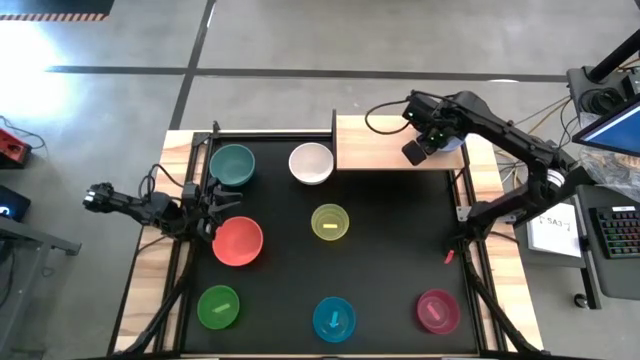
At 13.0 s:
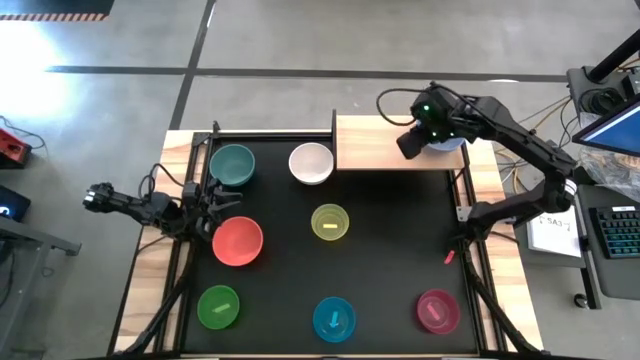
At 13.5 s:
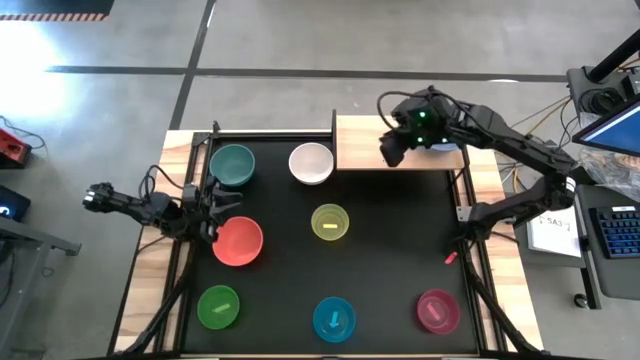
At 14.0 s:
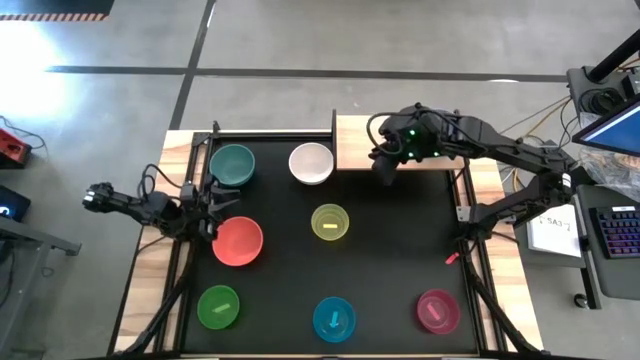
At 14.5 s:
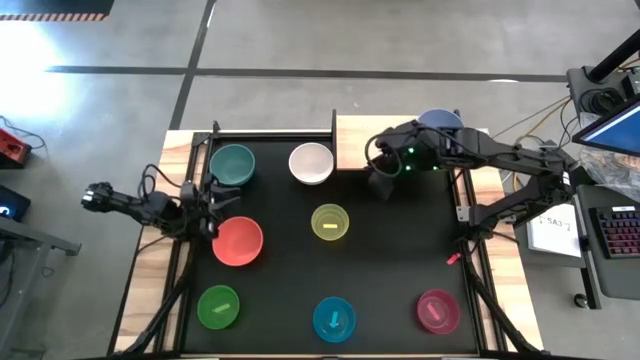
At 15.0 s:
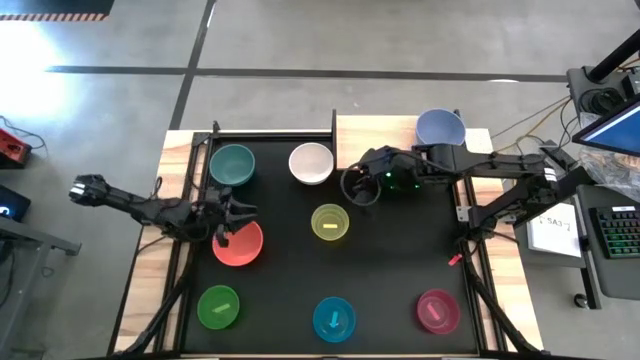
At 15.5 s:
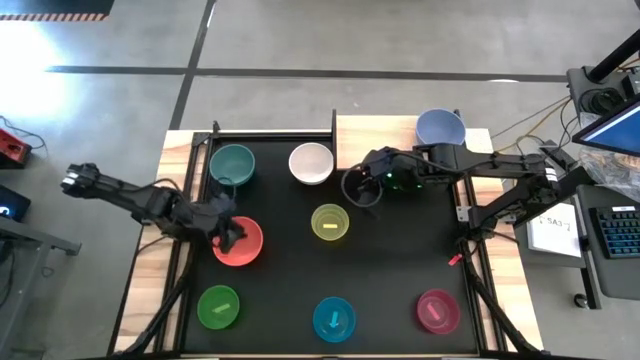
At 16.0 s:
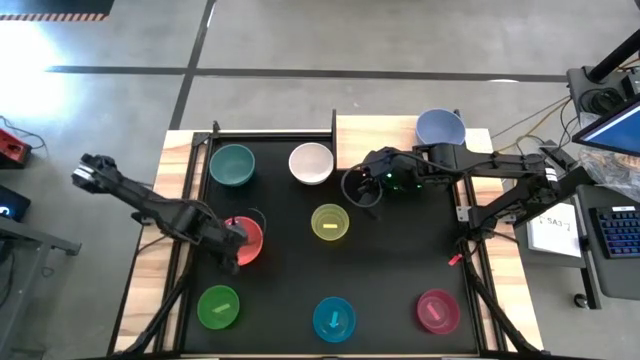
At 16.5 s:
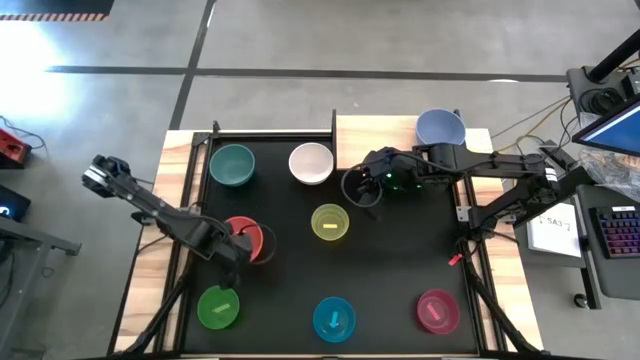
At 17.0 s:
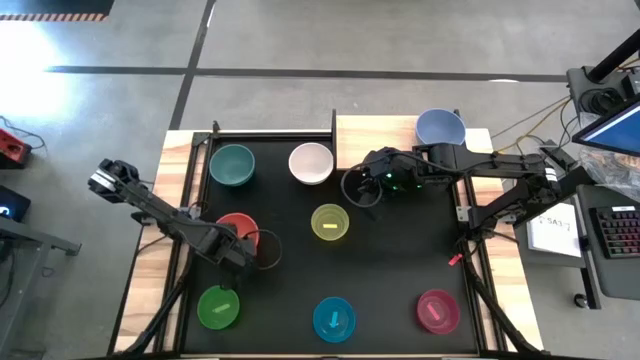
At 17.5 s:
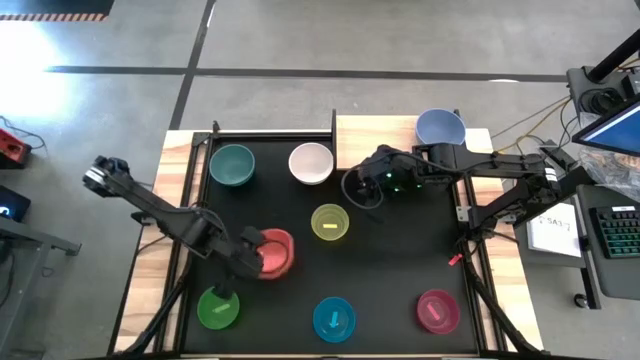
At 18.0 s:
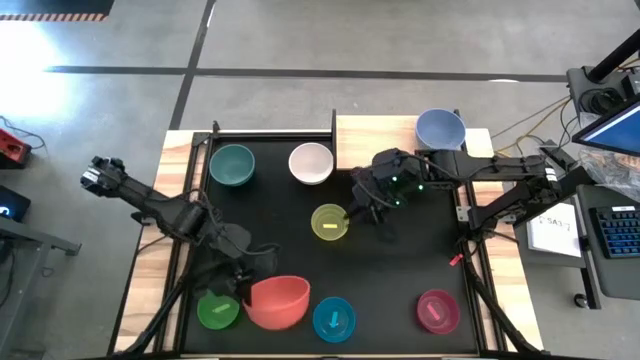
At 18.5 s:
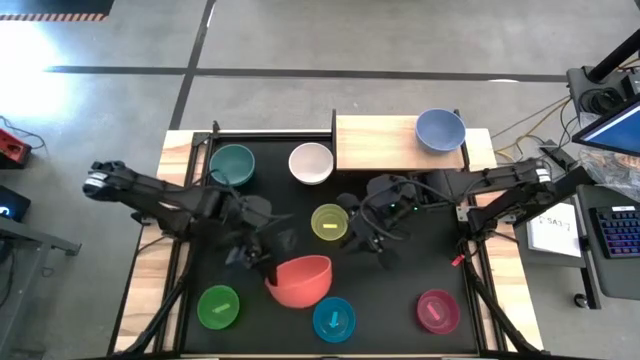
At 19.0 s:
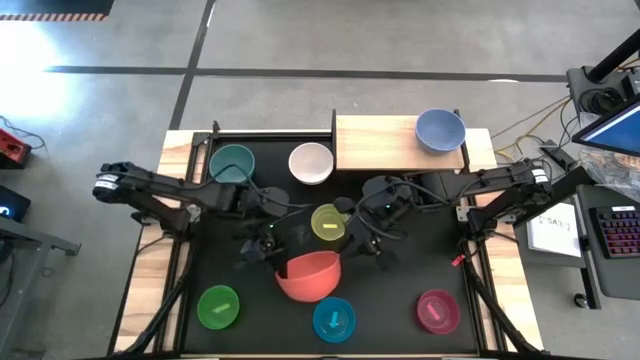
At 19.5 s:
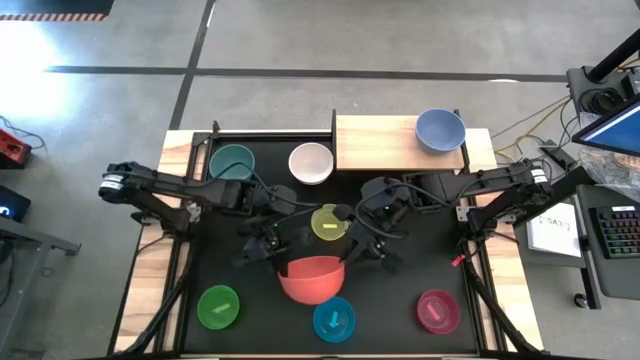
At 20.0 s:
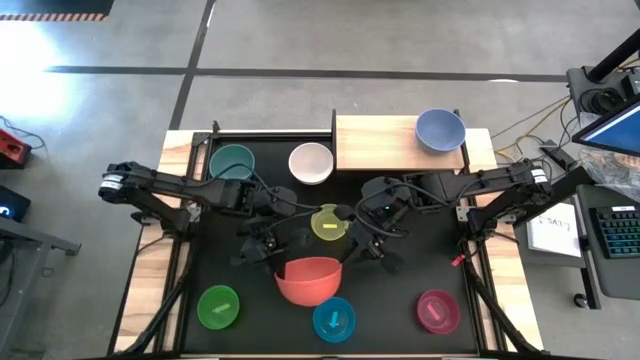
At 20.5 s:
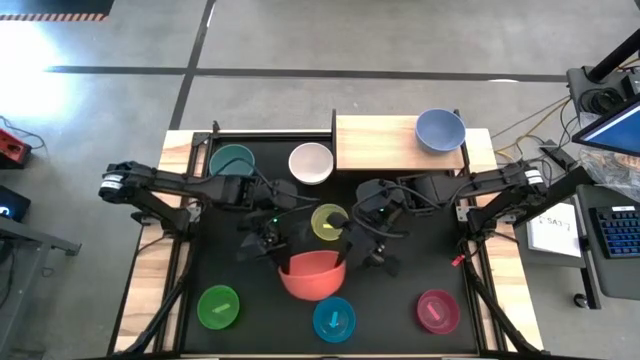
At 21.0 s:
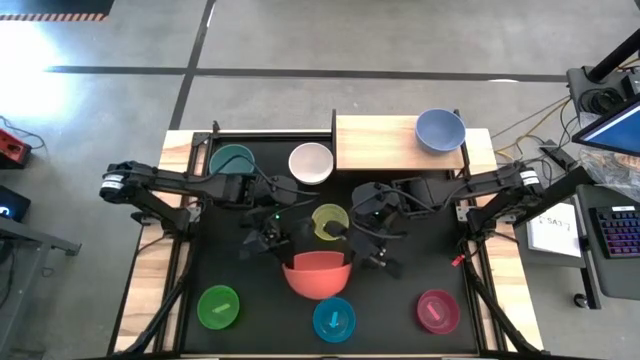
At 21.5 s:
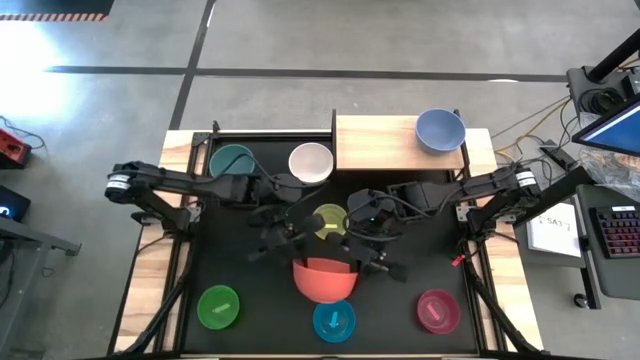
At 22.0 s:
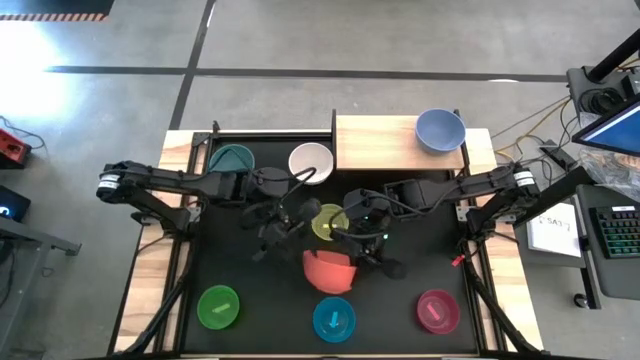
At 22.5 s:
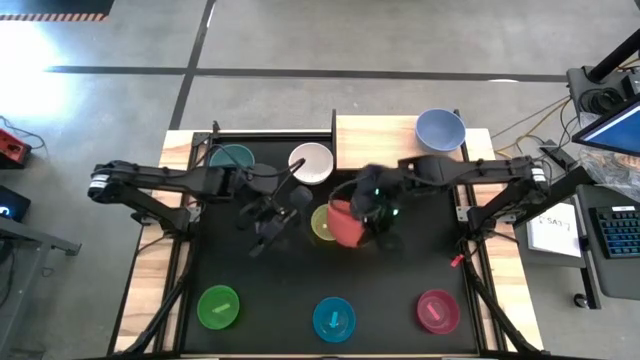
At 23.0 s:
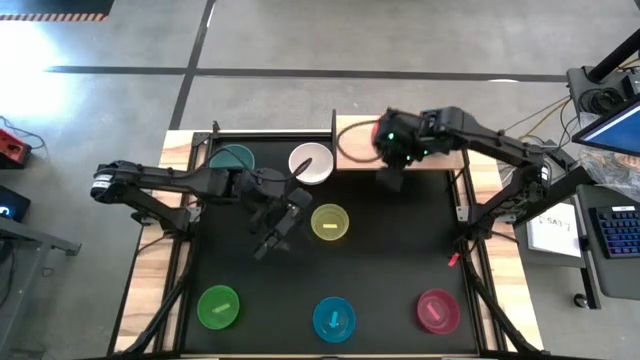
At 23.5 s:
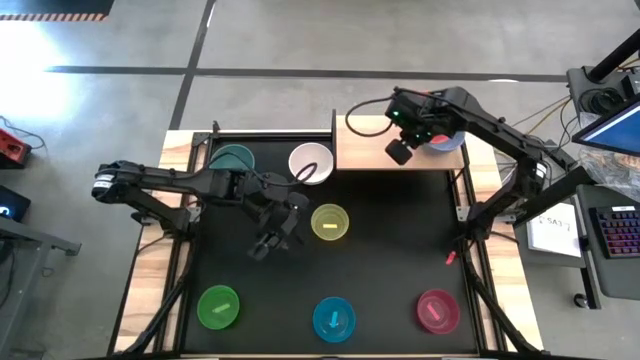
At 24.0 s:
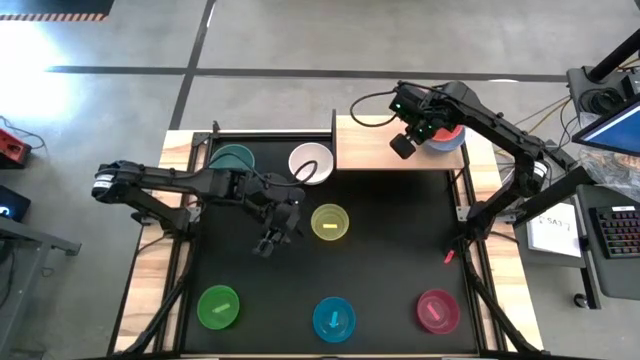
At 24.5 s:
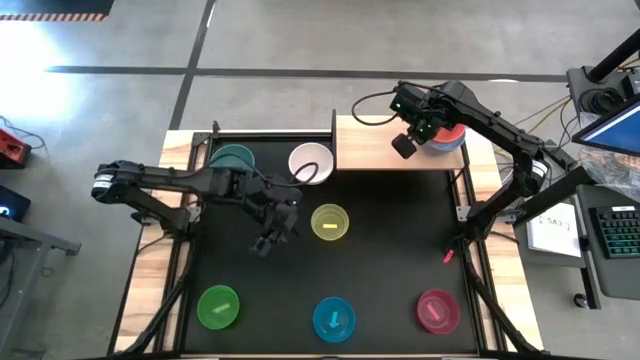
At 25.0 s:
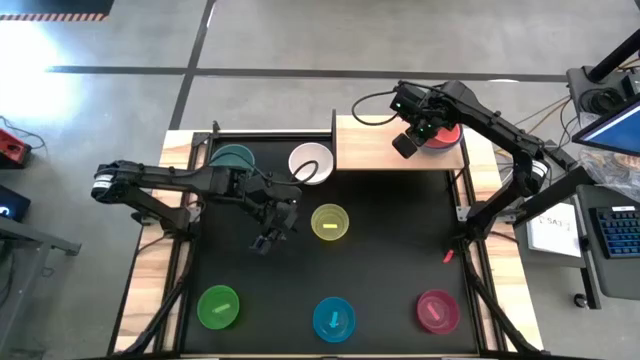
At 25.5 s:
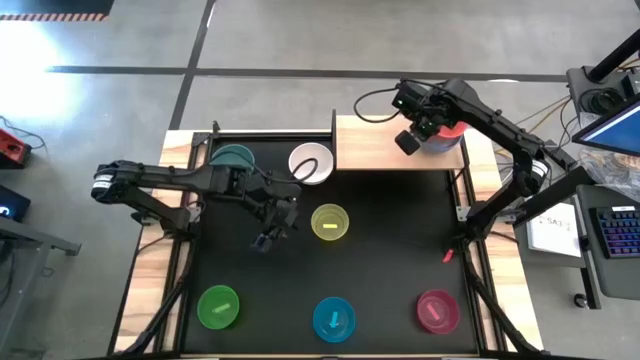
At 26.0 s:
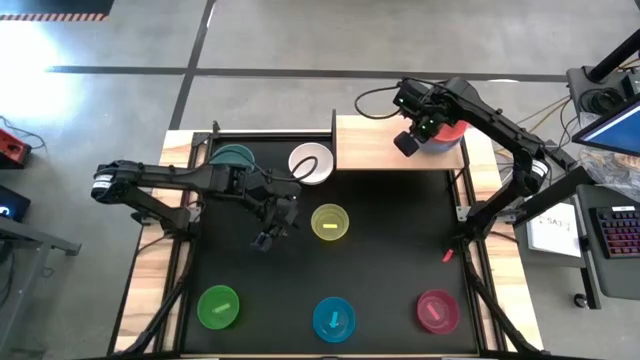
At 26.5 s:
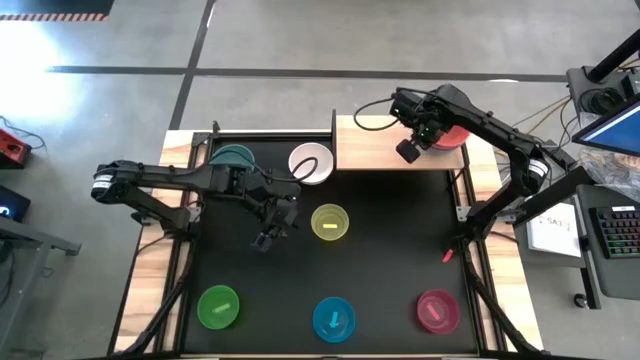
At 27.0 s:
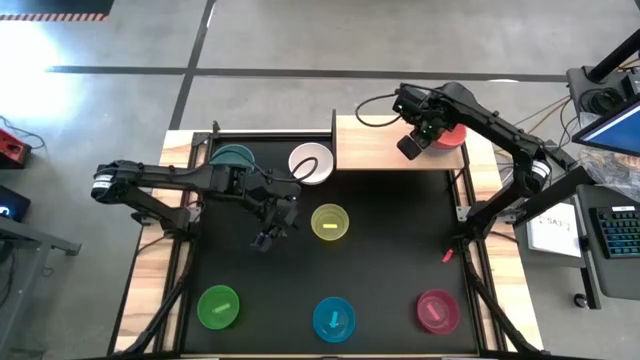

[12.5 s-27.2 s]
Task: Place and stack bowls onto a shelf
Stack the orange bowl on top of the blue bowl on the shelf

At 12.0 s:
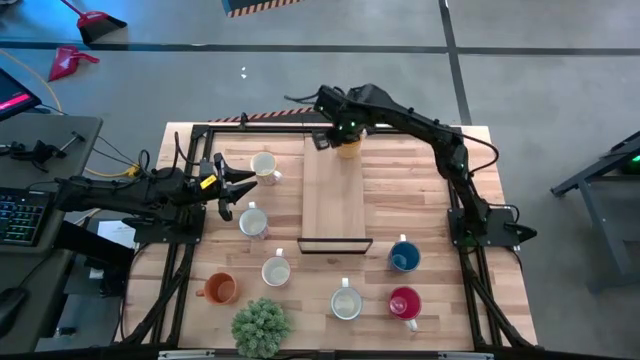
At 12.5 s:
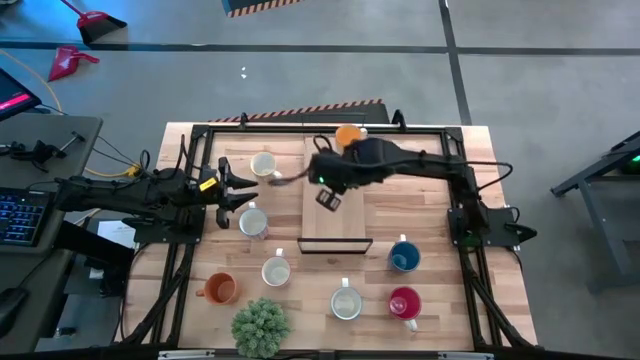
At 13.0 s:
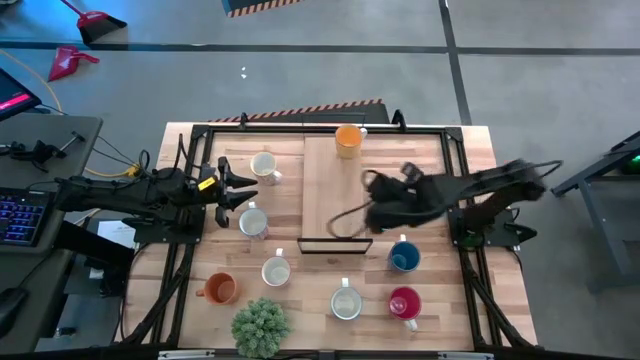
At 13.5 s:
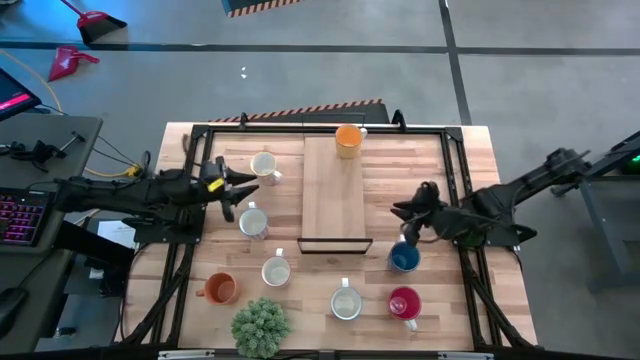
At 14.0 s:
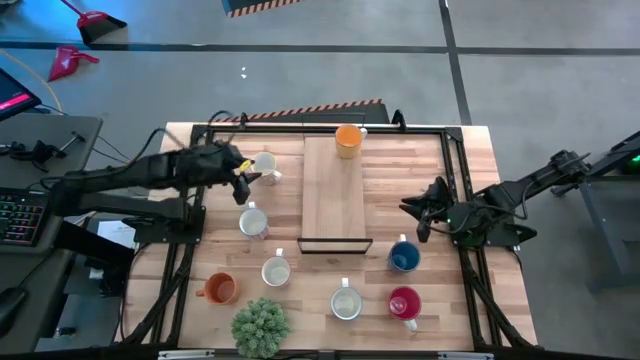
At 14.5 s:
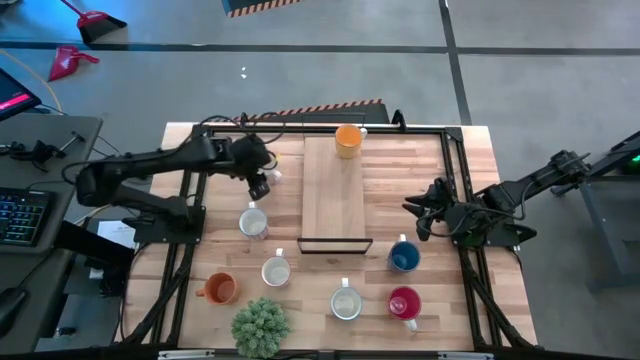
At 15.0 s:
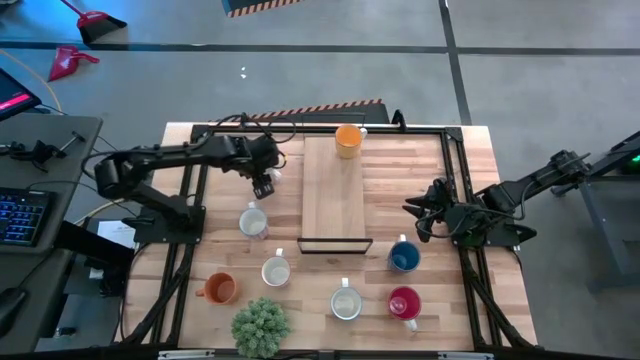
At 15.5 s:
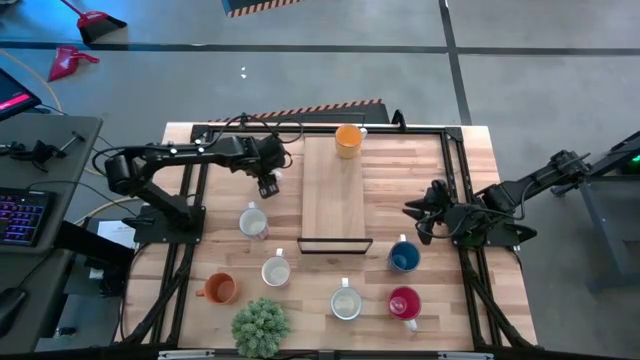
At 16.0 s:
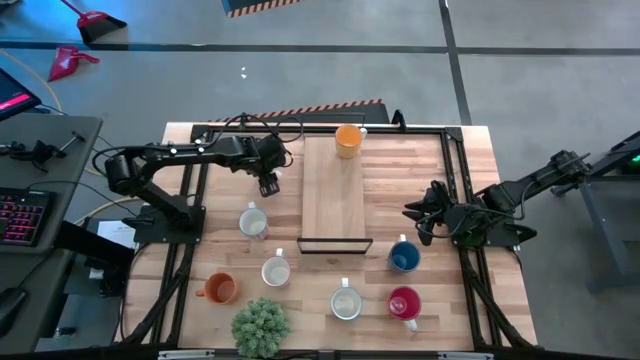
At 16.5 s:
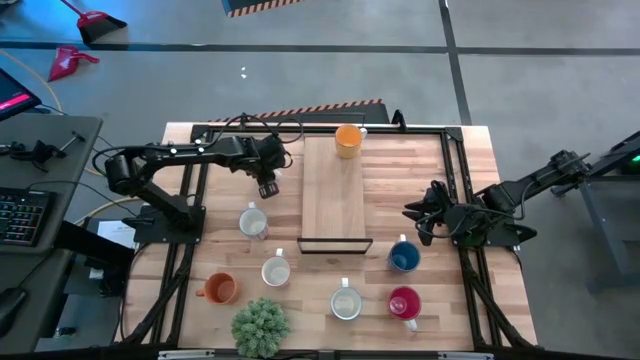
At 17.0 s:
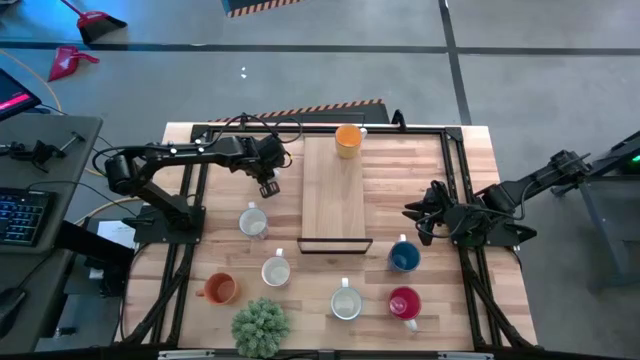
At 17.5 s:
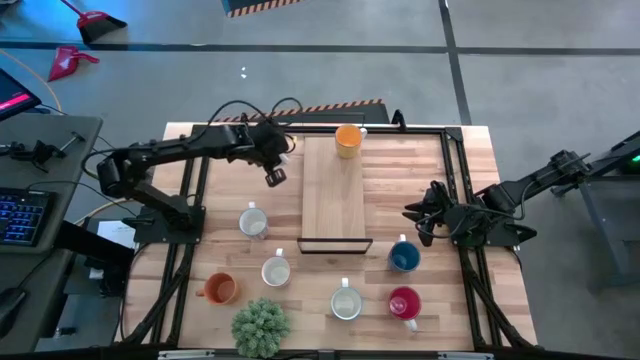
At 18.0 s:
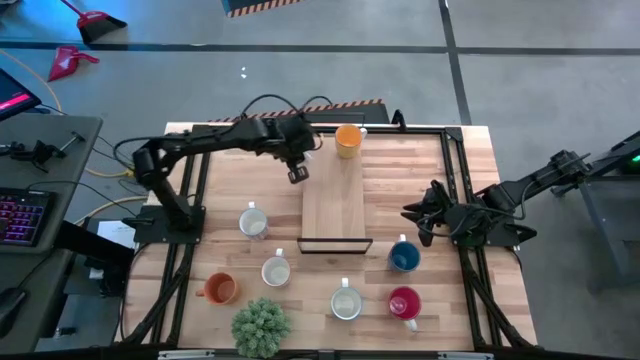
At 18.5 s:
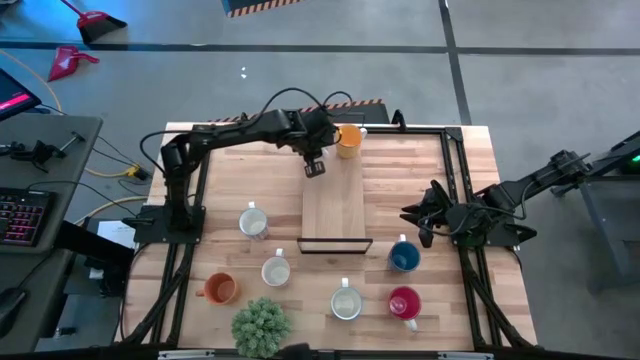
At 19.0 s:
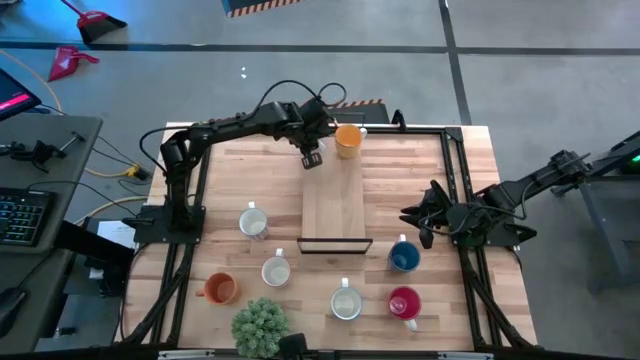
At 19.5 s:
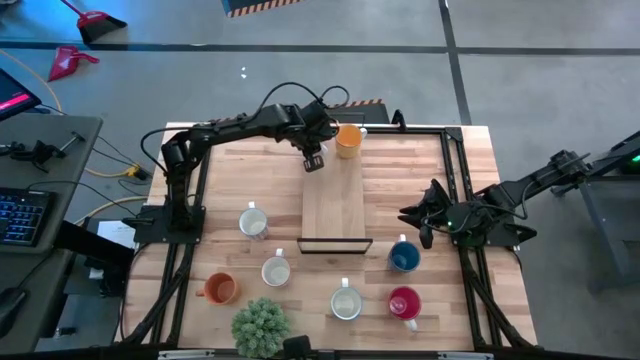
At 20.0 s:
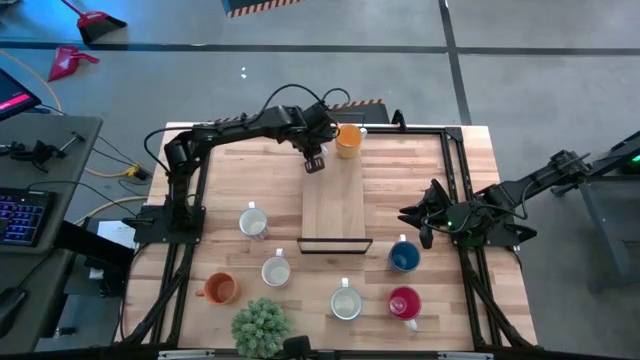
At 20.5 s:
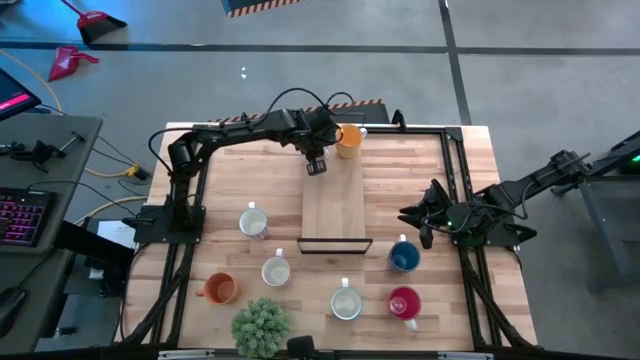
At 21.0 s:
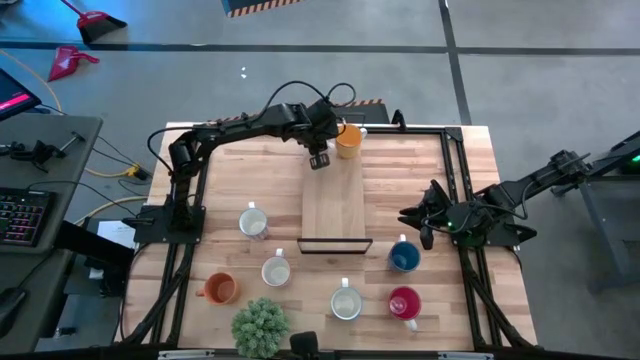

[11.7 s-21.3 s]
Task: Place coffee mugs
Put the orange cup on the shelf aligned with the other yellow cup
